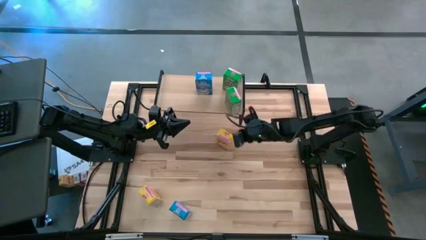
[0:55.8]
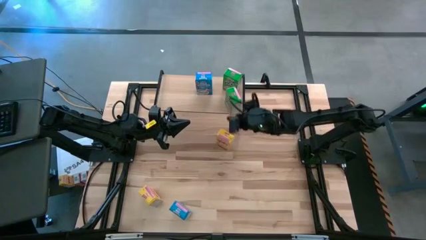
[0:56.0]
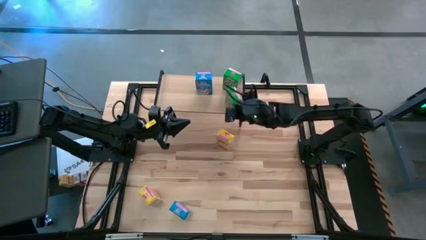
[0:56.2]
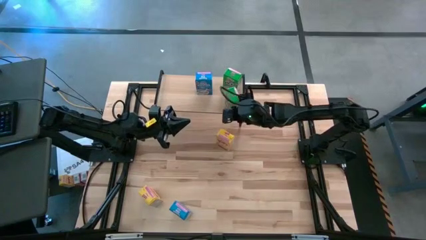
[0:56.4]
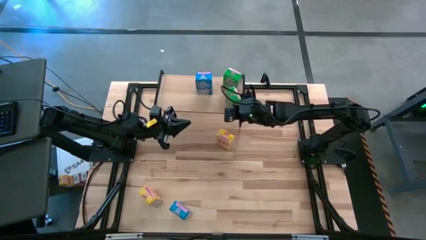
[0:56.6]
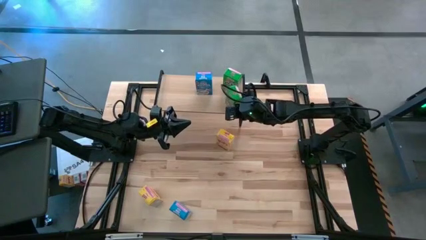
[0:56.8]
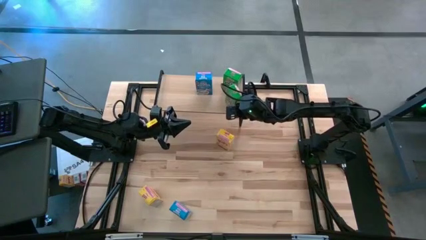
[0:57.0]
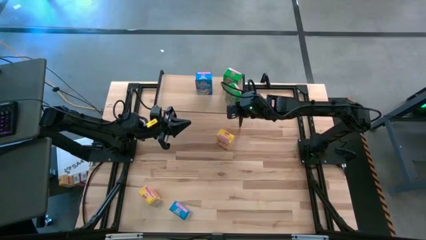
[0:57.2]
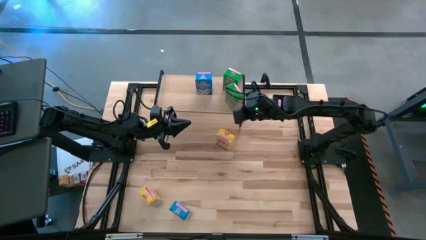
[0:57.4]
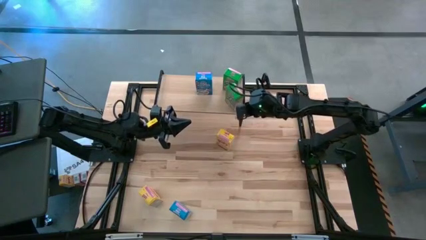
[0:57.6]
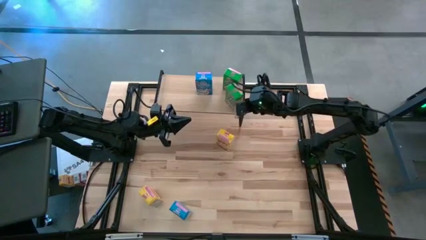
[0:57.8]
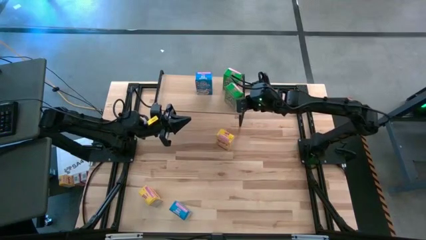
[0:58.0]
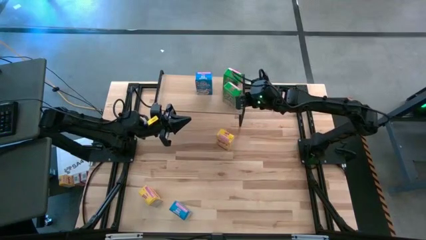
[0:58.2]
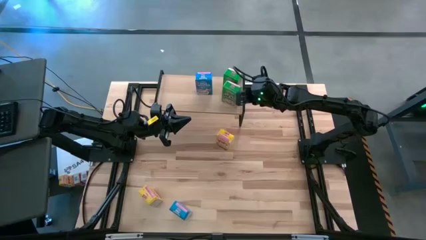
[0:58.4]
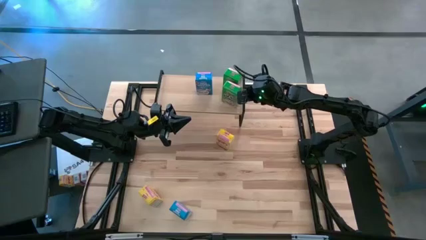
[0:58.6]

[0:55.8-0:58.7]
Task: Stack cereal on shelf
Adjust the bottom green cereal box on the shelf

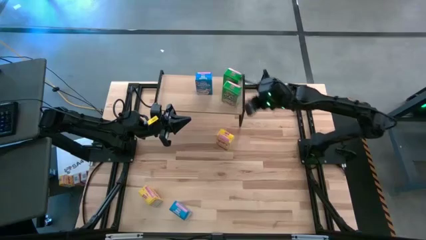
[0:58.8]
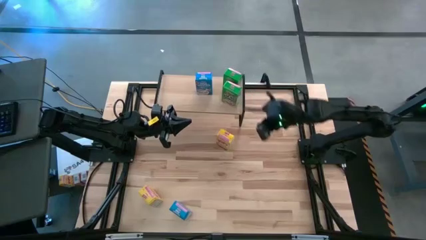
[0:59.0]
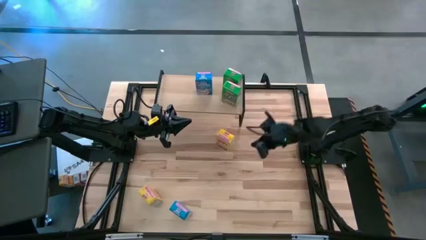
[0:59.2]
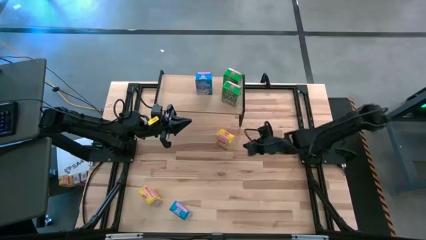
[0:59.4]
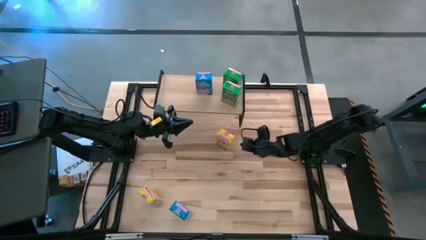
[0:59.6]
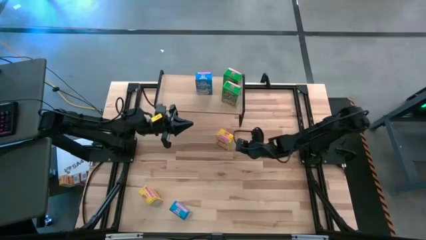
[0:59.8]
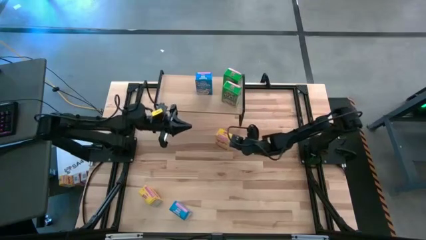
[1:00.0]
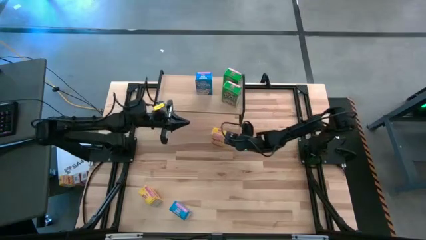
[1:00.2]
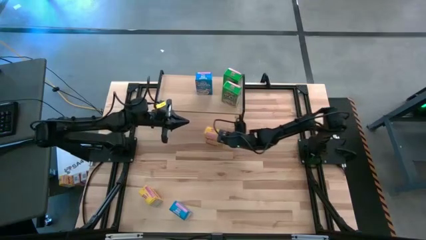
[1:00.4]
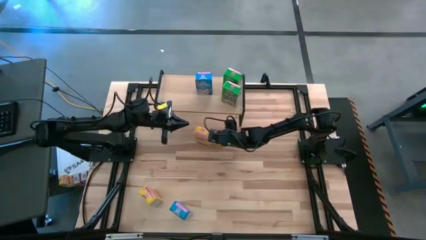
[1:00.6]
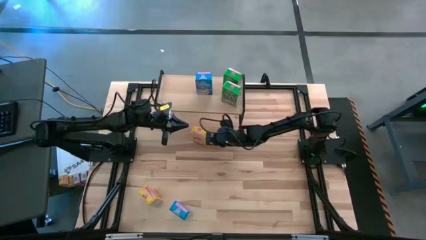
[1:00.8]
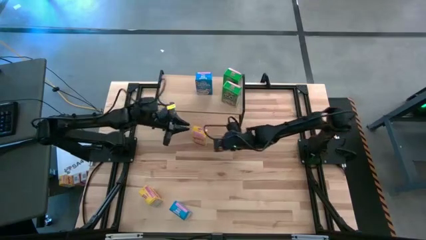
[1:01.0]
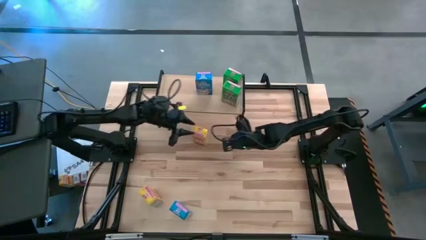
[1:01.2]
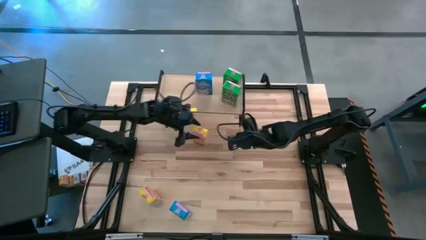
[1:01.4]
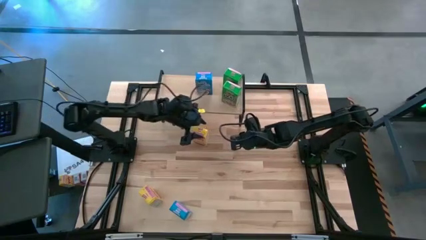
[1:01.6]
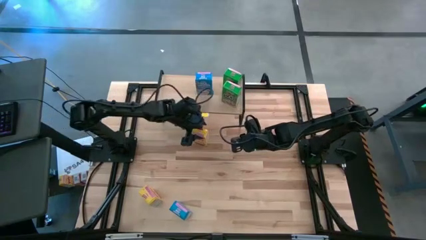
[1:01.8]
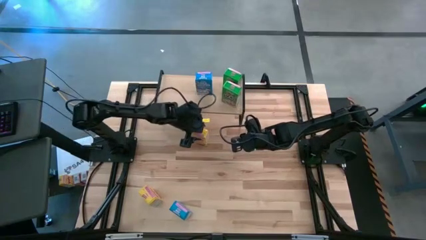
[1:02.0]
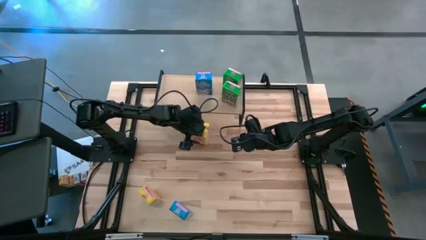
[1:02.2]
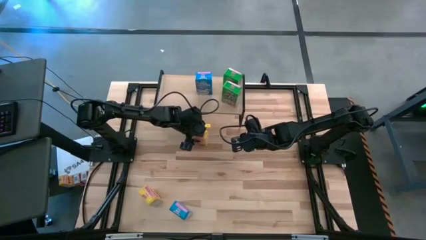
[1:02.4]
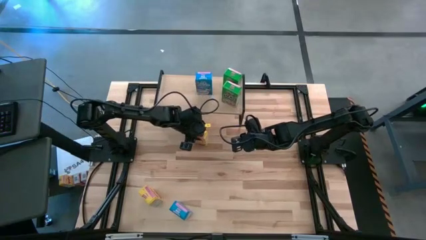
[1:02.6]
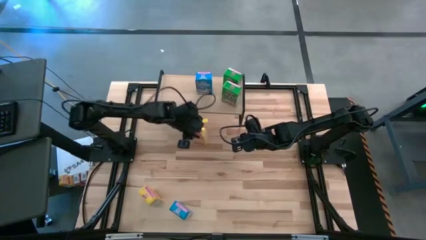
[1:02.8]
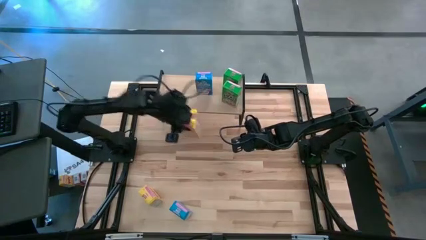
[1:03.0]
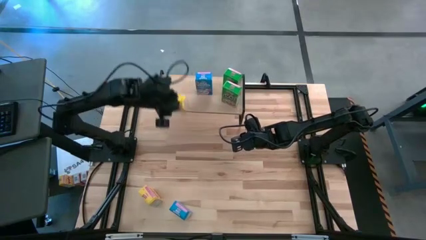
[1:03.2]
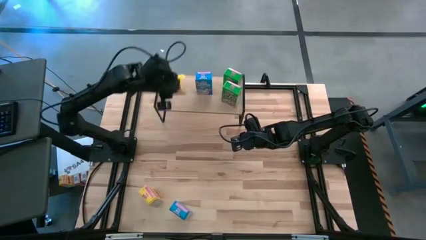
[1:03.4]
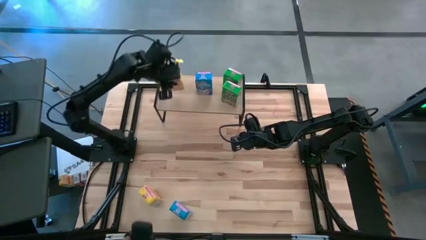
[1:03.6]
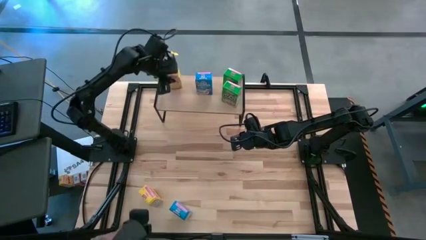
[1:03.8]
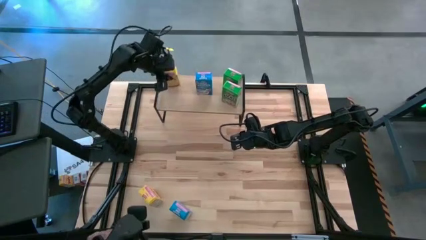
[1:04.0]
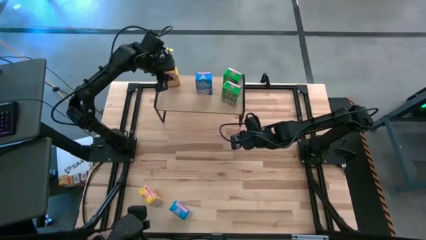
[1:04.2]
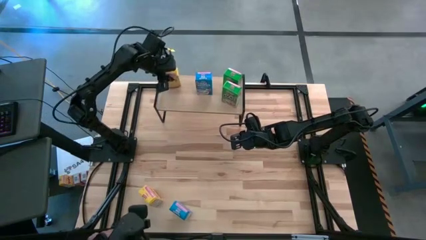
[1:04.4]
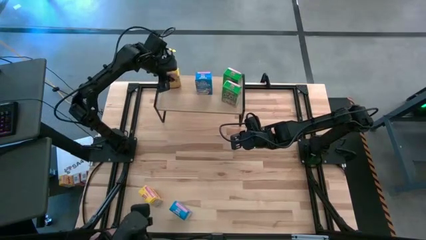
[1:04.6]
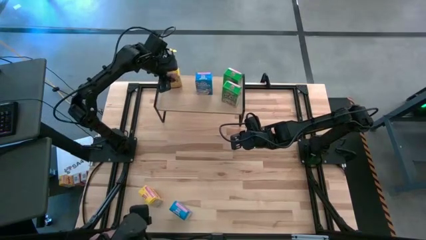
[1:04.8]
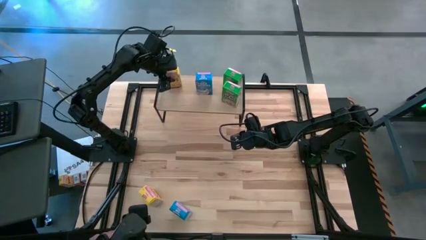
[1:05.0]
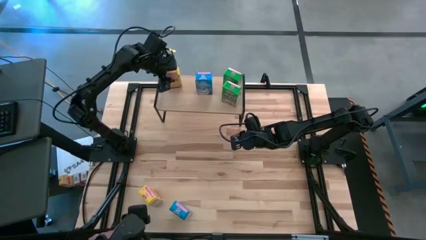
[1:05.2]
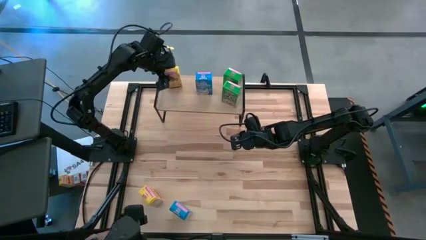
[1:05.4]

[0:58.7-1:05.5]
Put the top yellow cereal box on the shelf

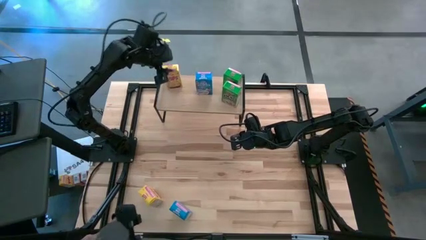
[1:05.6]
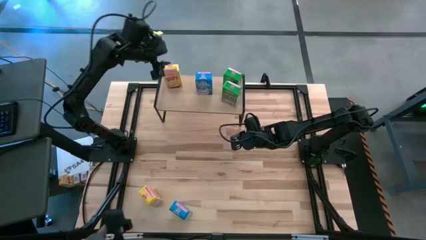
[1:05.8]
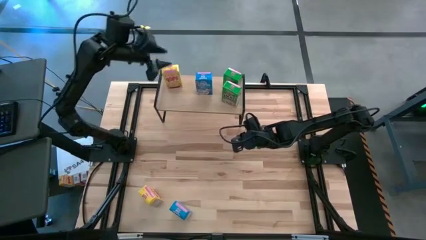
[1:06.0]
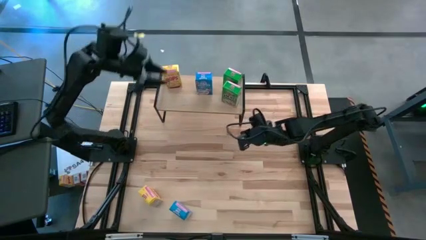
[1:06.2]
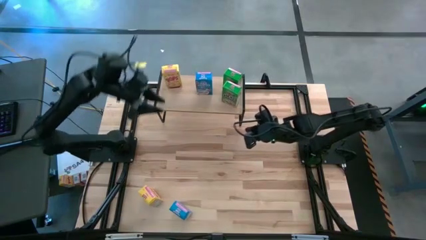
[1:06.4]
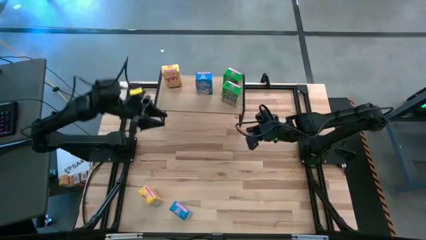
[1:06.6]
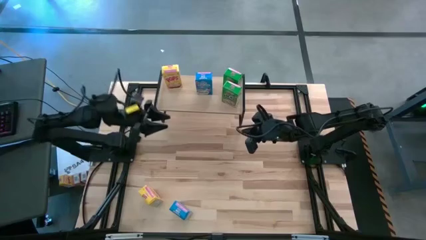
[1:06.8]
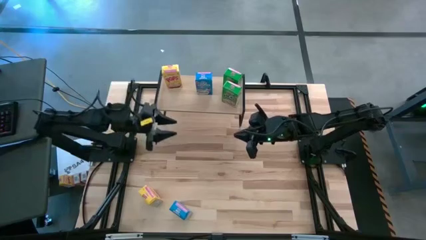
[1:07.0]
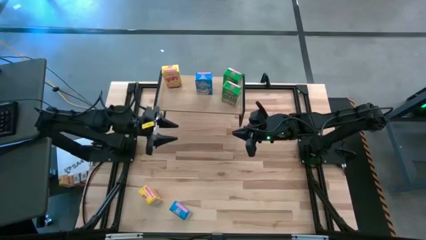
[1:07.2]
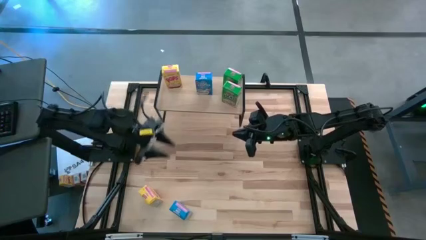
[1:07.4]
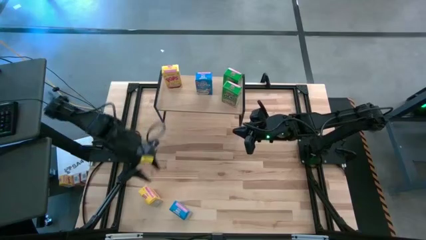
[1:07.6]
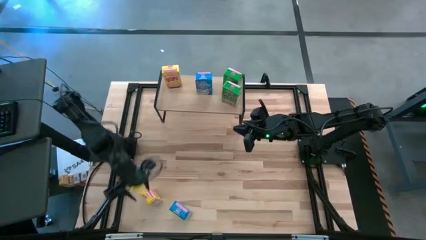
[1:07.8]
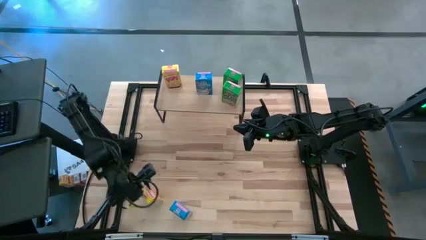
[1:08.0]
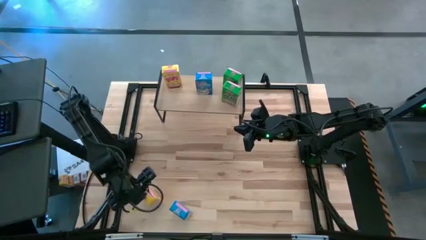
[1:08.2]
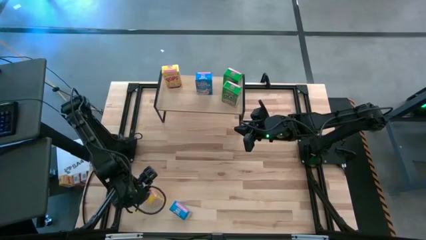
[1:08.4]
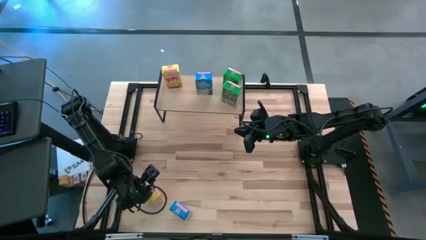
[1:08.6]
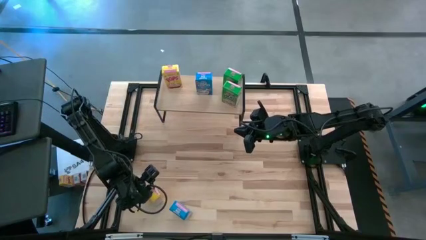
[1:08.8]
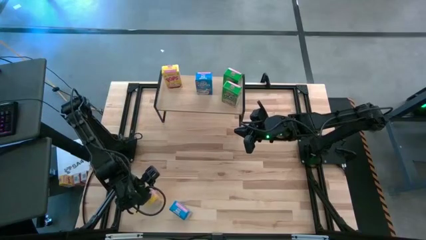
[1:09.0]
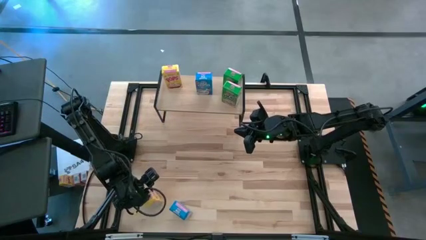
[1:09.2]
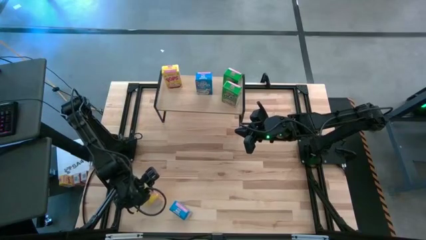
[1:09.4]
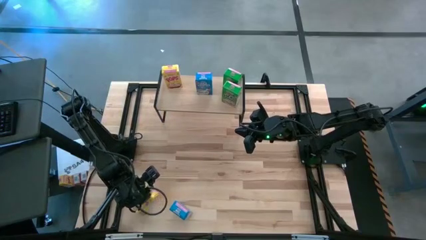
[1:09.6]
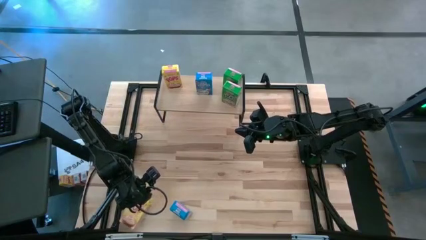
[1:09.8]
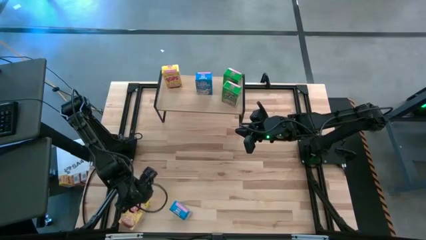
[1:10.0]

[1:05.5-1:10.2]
Put the yellow cereal box on the shelf aligned with the other yellow cereal box
